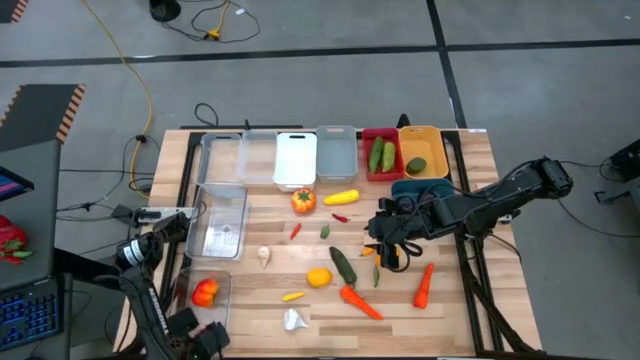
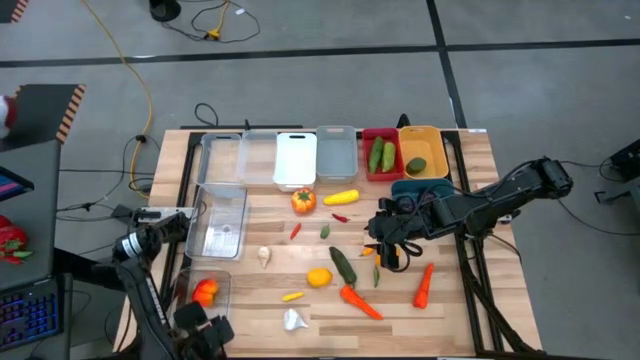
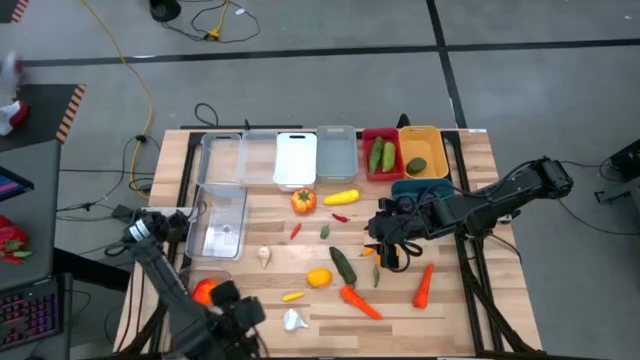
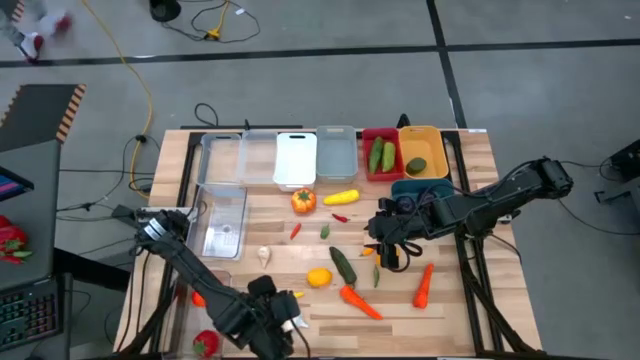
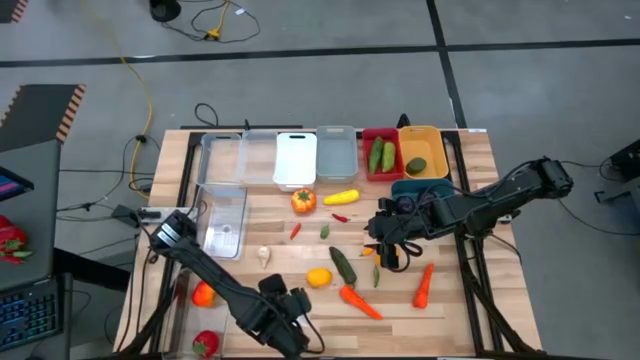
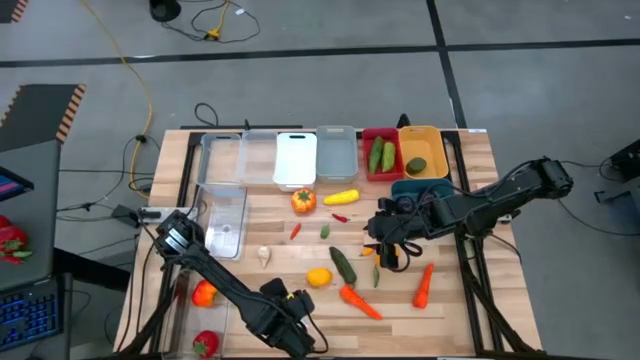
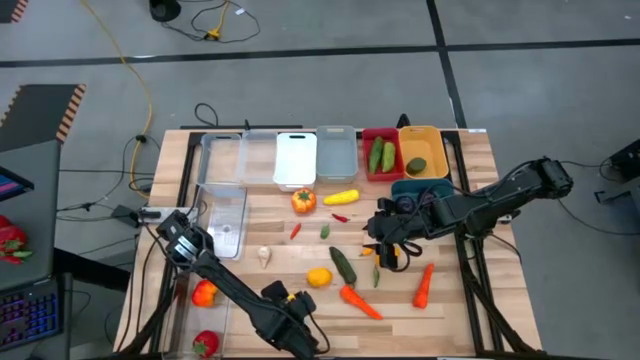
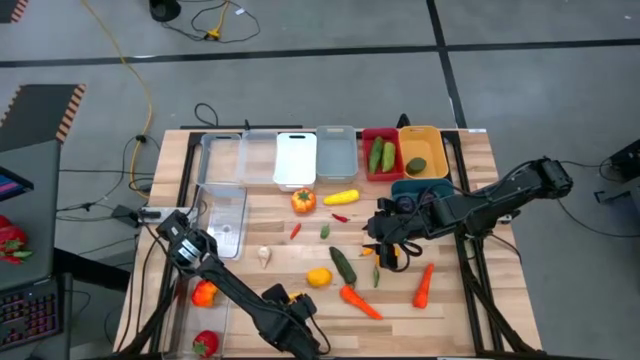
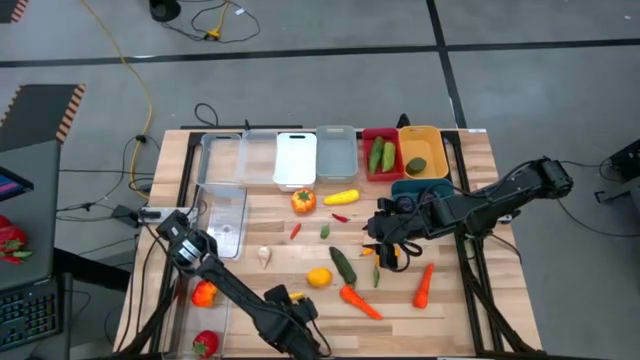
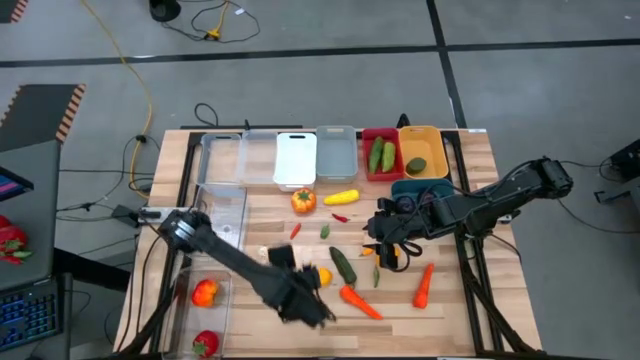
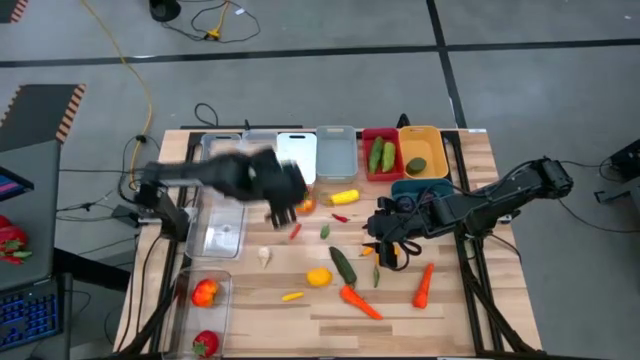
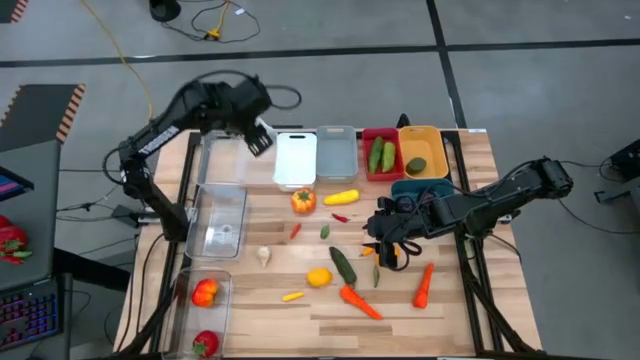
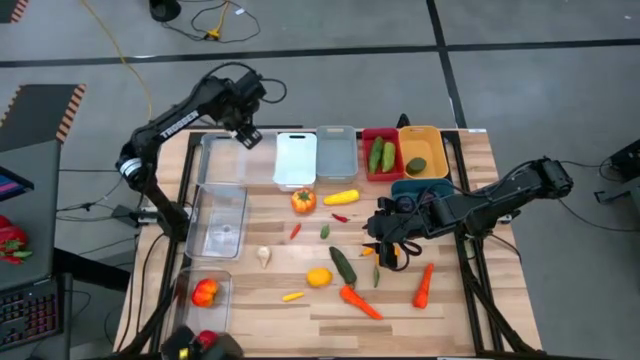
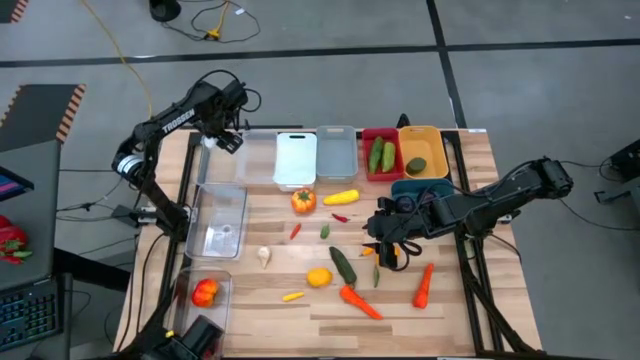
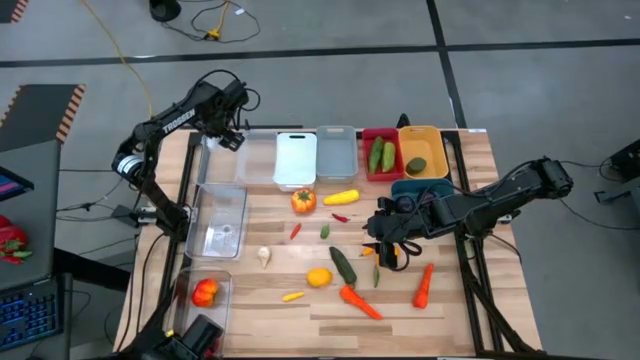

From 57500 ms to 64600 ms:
Task: Sort produce into baskets
Put the bottom garlic into the left small transparent bin

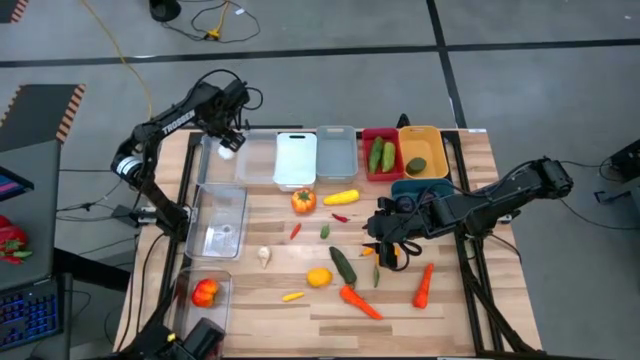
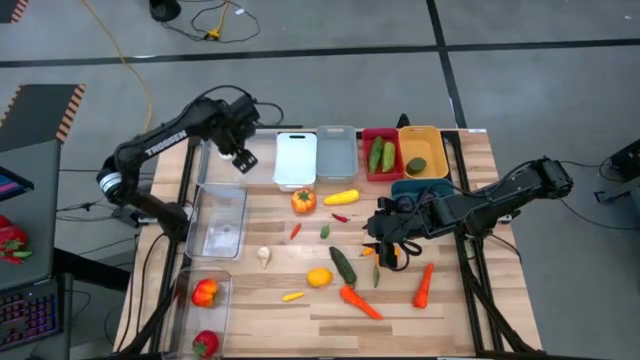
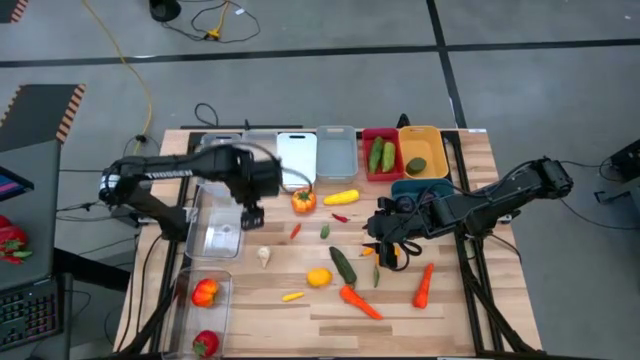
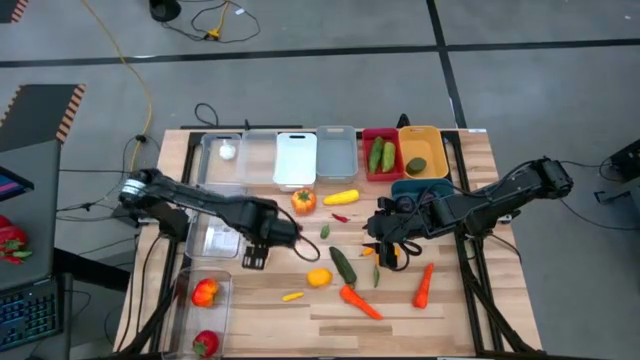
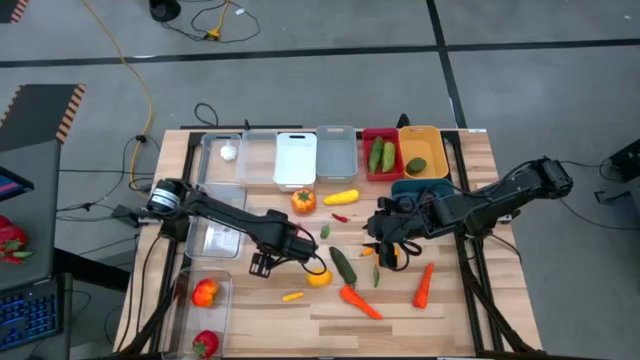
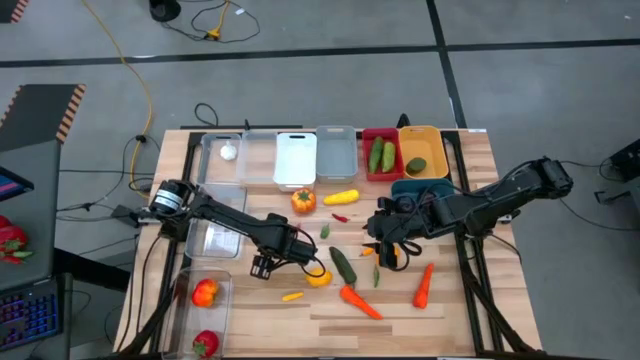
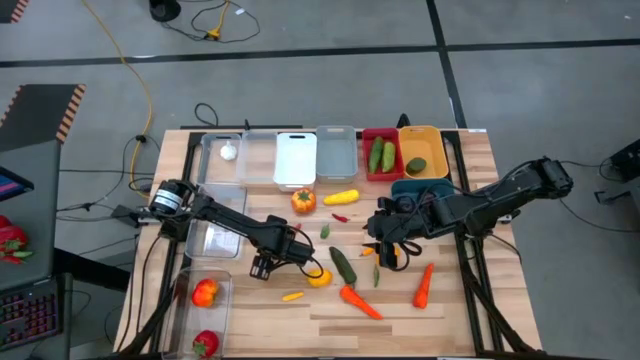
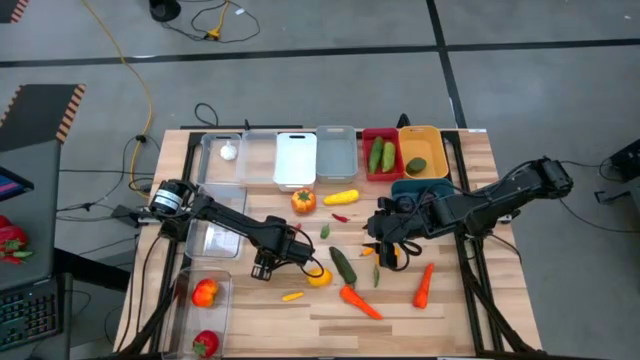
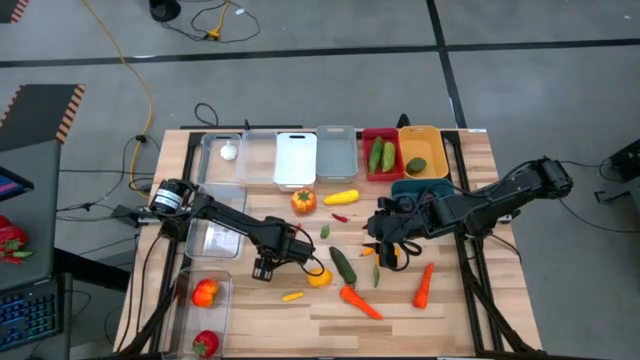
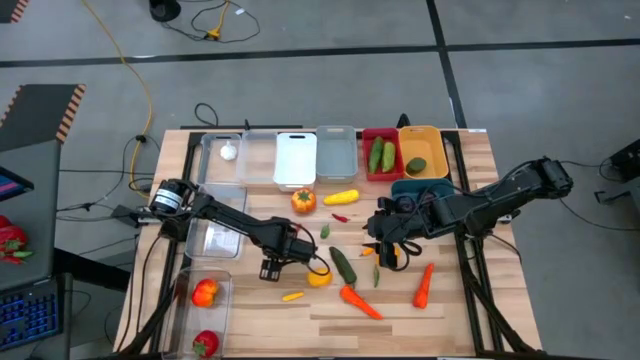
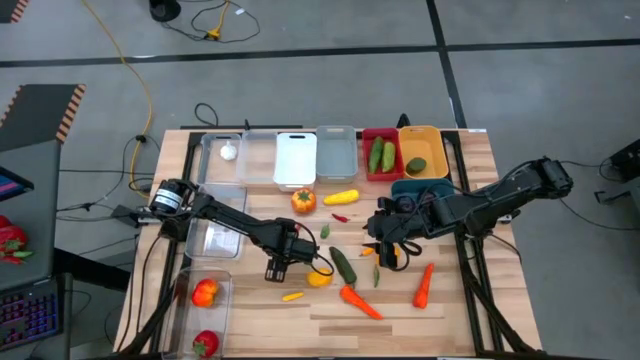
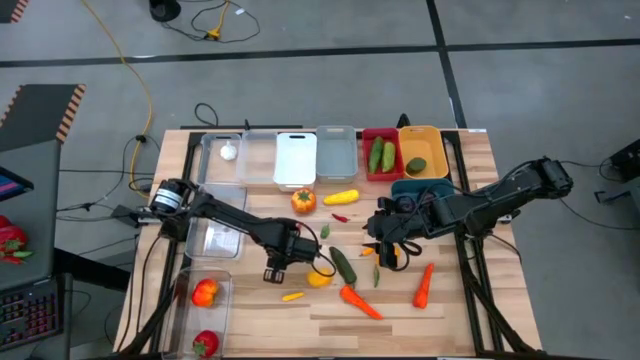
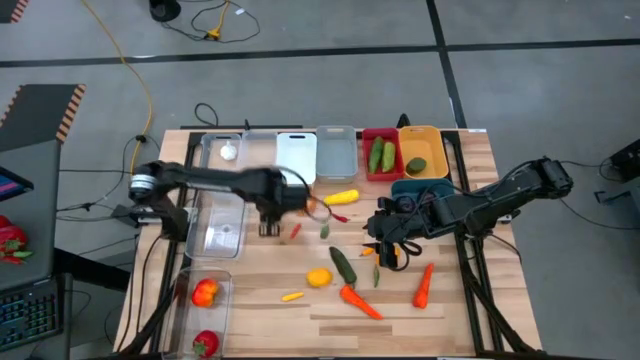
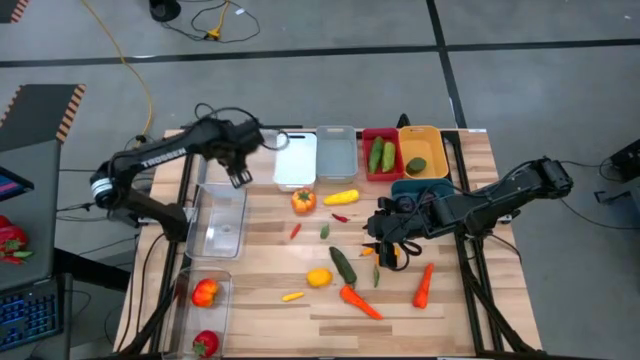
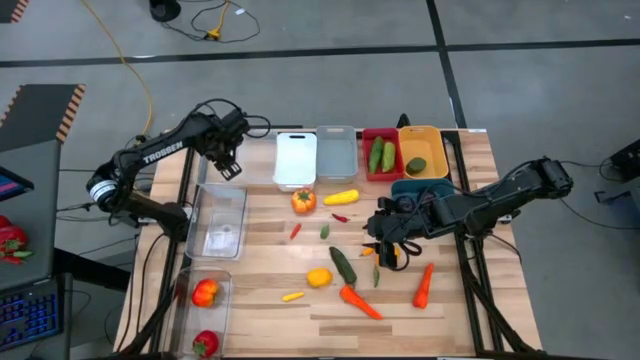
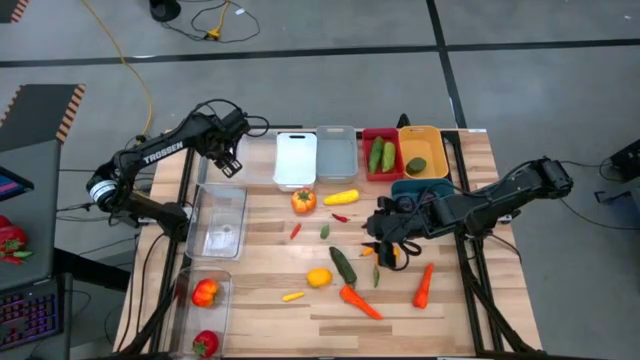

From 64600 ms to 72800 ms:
Put the garlic into the left small transparent bin

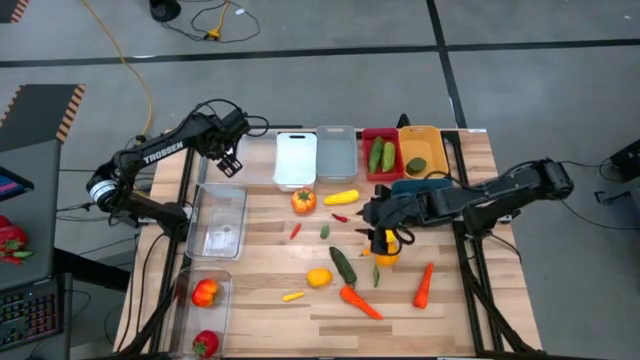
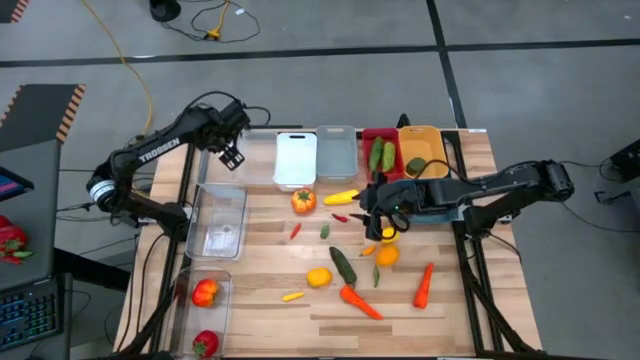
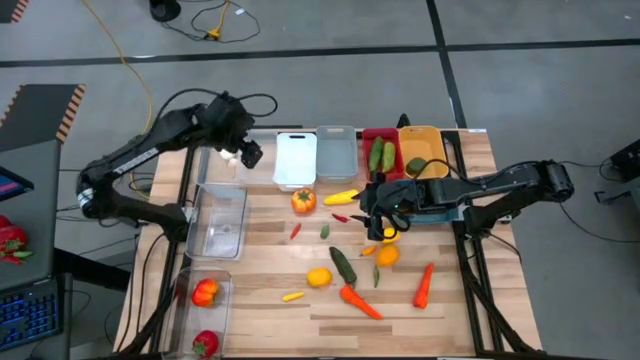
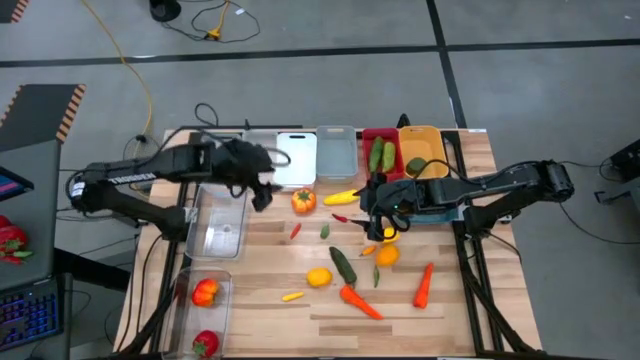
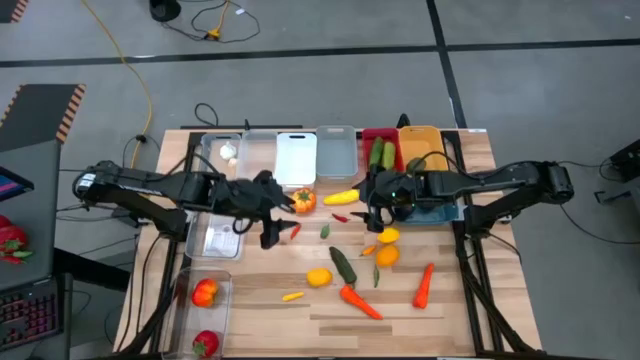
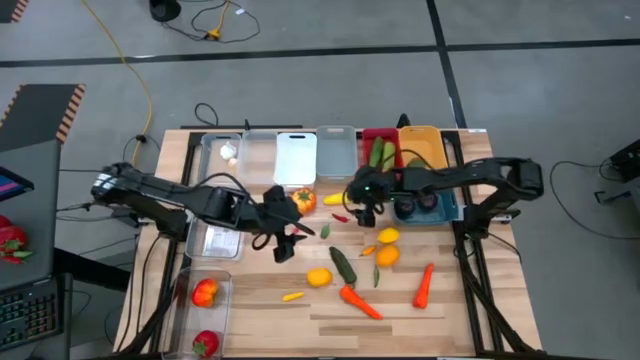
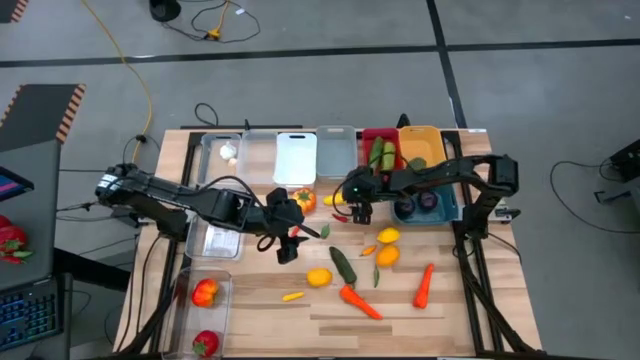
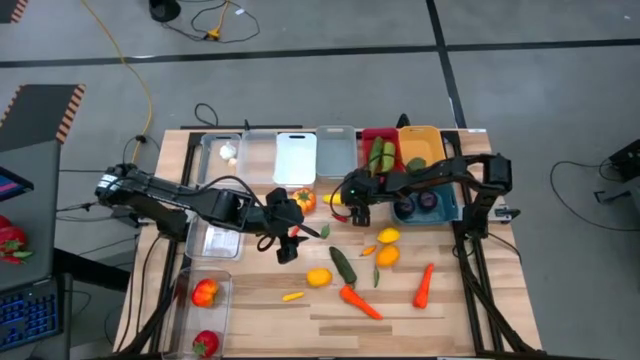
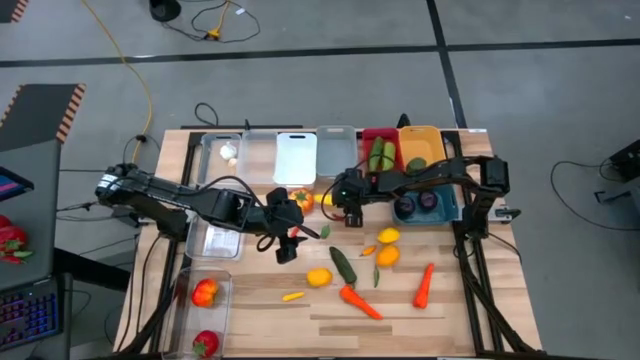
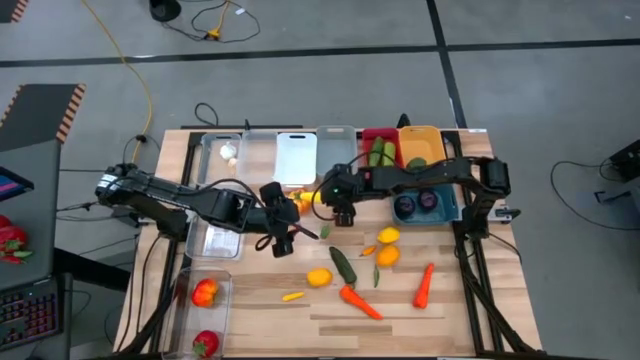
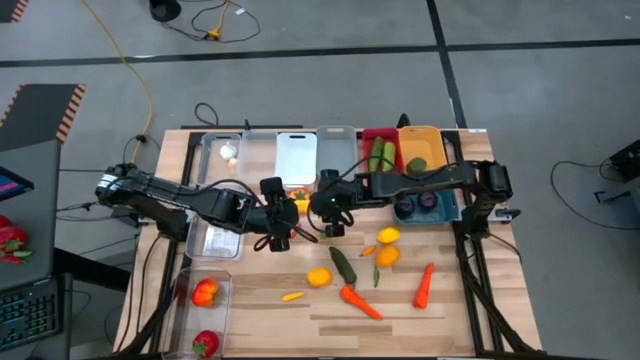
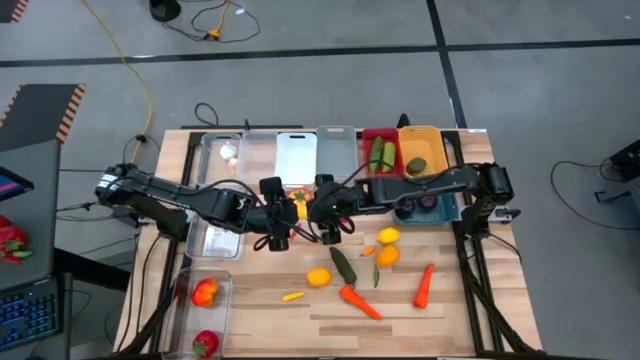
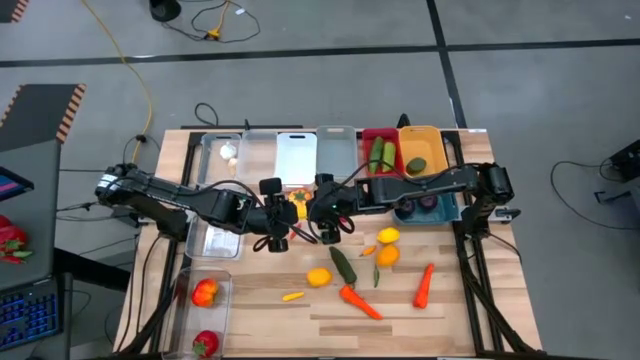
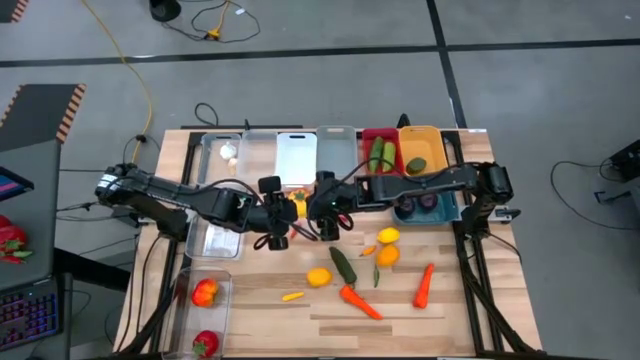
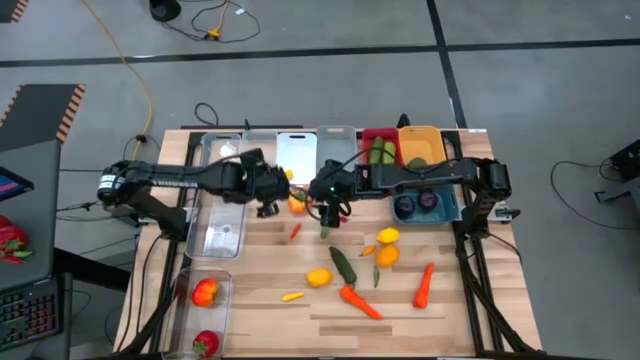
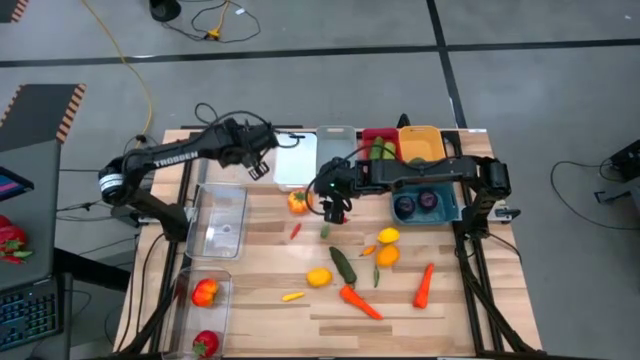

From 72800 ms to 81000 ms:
Put the top corn into the right small transparent bin
